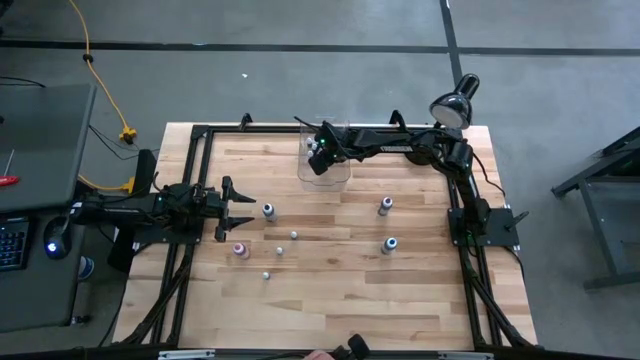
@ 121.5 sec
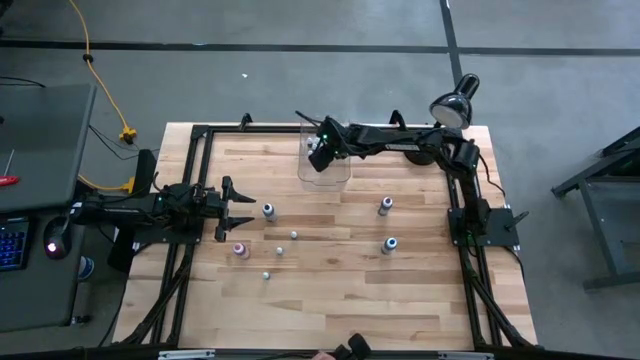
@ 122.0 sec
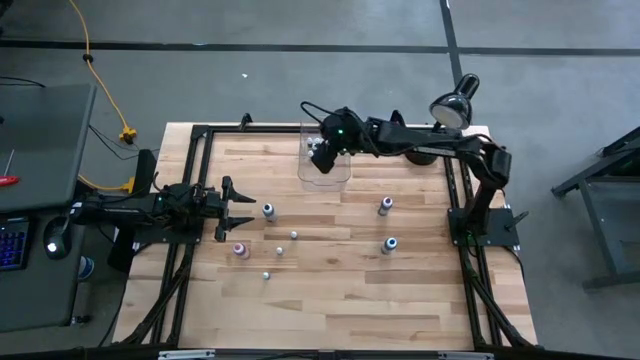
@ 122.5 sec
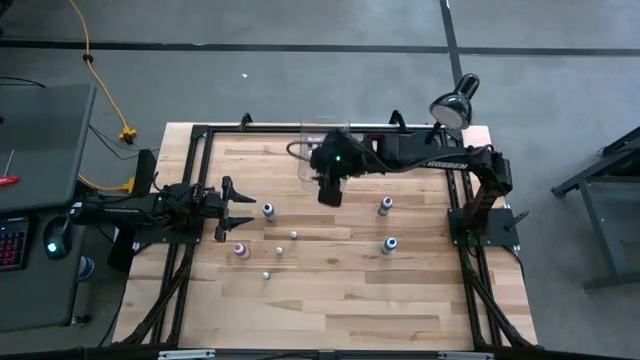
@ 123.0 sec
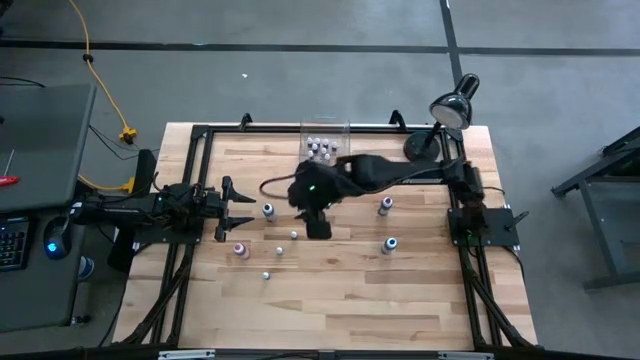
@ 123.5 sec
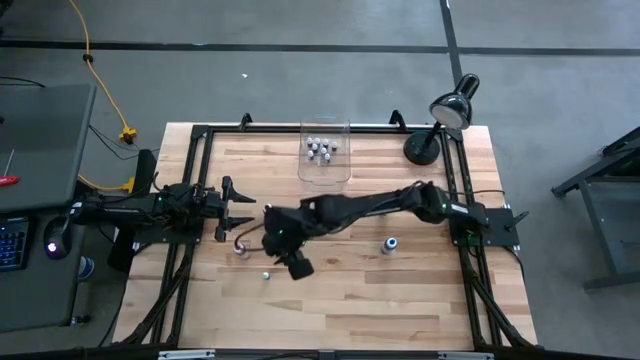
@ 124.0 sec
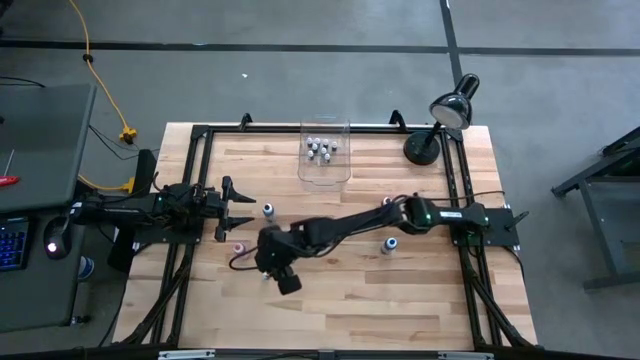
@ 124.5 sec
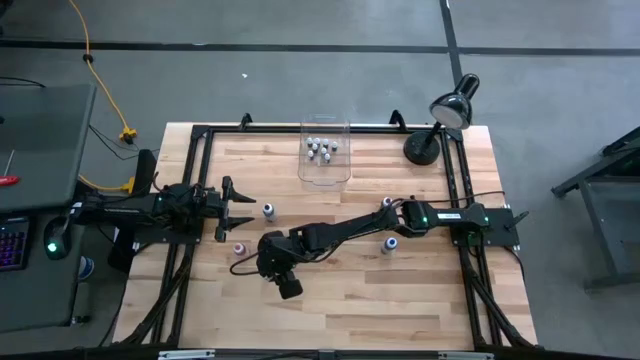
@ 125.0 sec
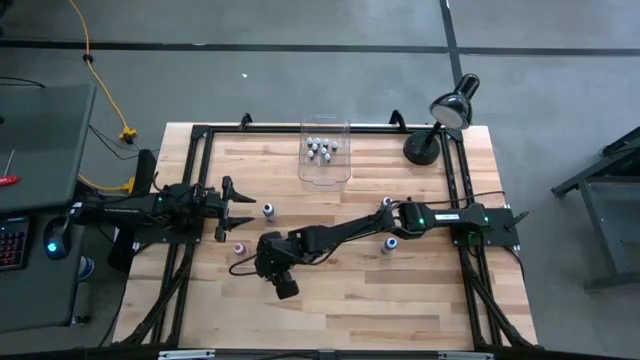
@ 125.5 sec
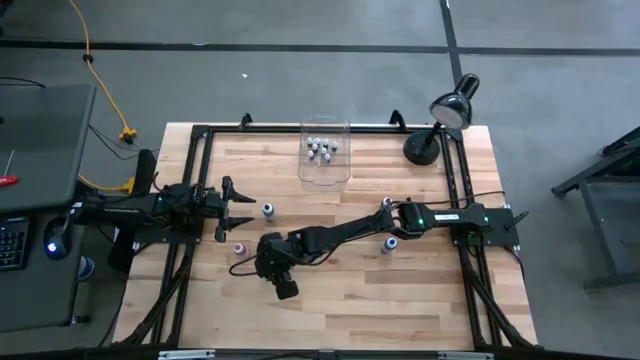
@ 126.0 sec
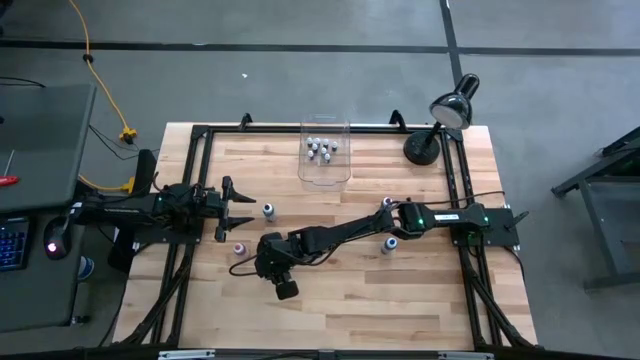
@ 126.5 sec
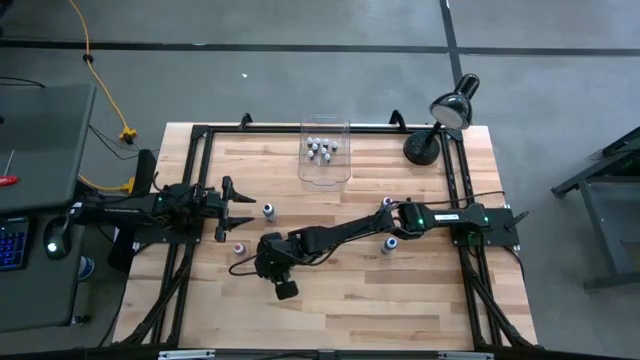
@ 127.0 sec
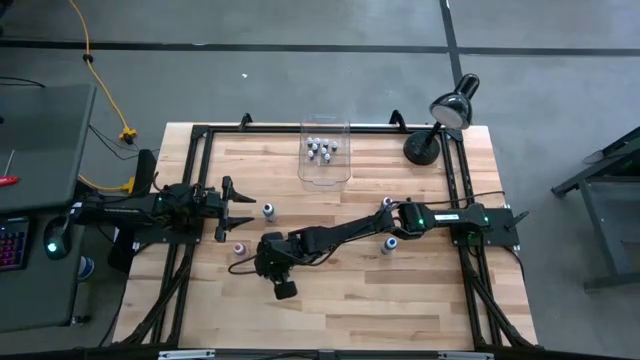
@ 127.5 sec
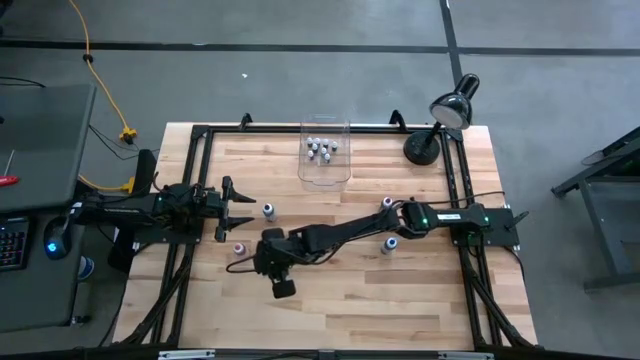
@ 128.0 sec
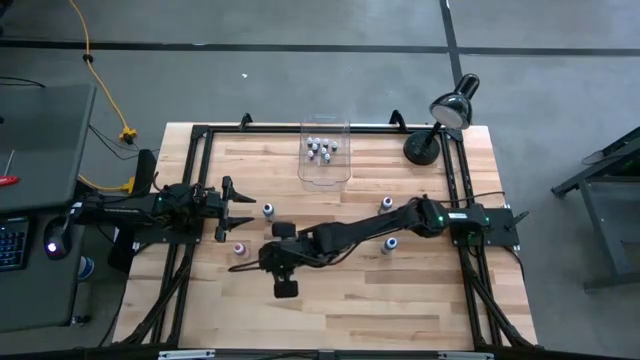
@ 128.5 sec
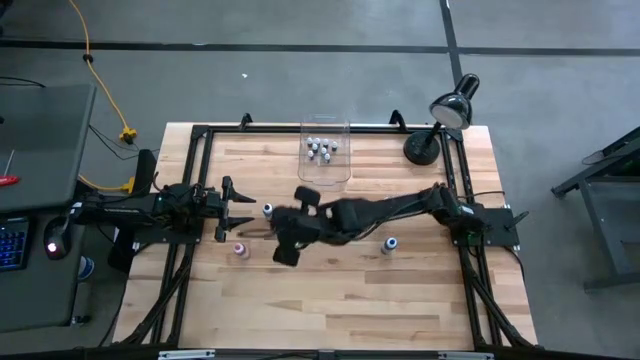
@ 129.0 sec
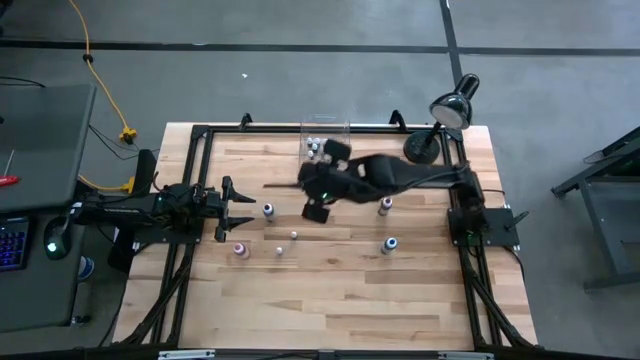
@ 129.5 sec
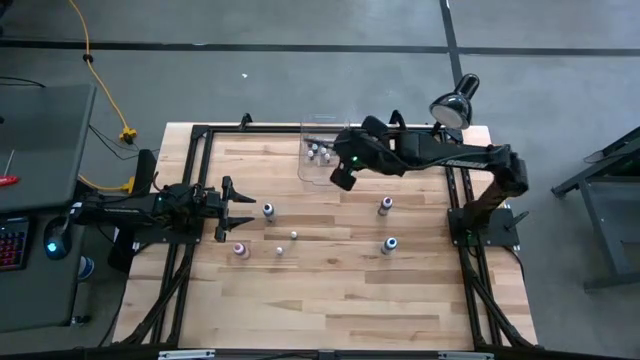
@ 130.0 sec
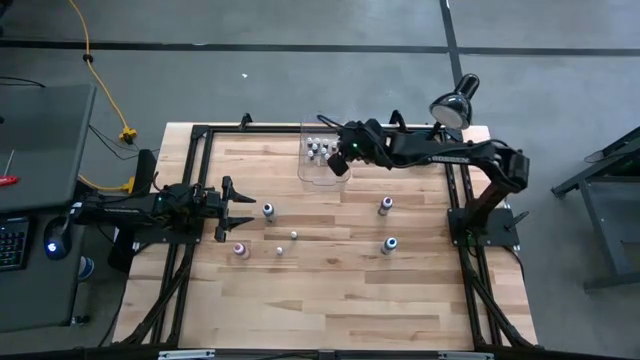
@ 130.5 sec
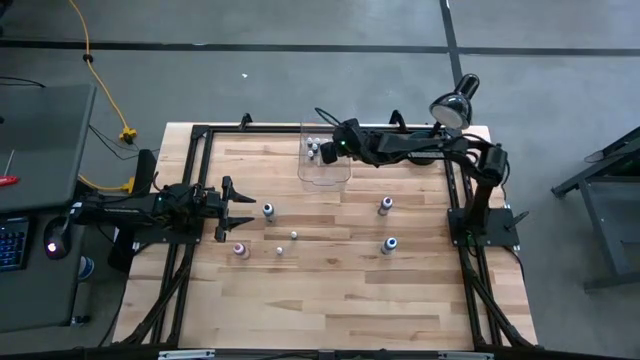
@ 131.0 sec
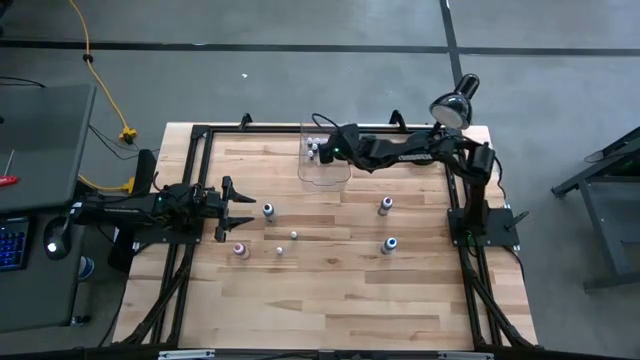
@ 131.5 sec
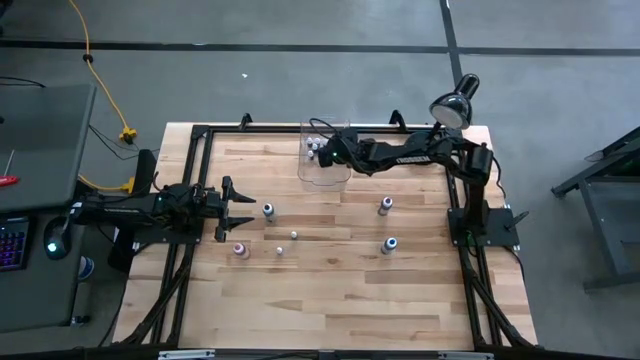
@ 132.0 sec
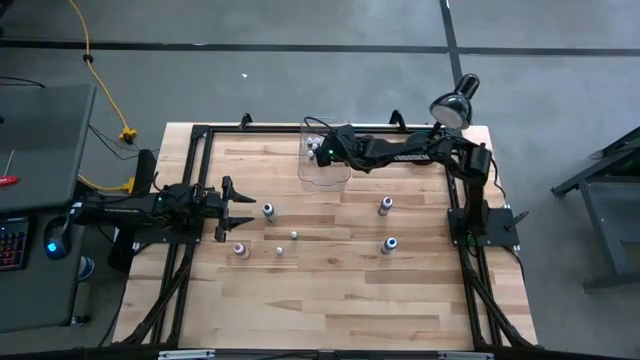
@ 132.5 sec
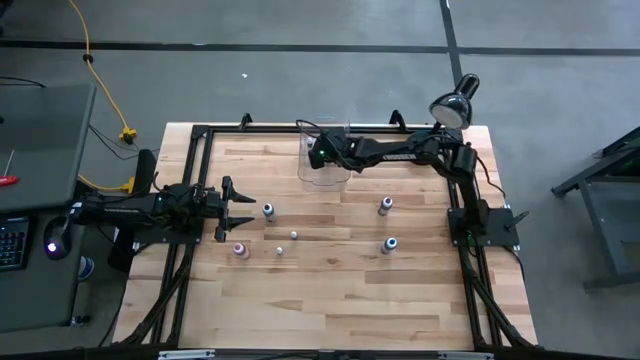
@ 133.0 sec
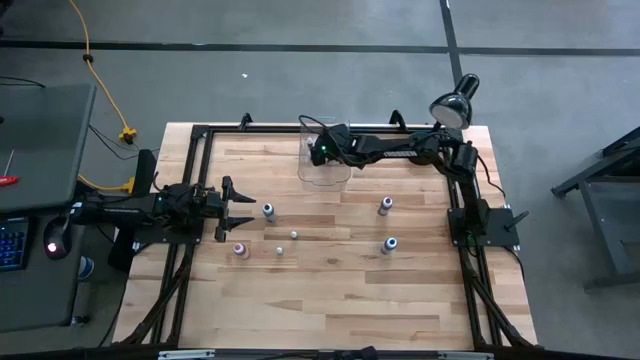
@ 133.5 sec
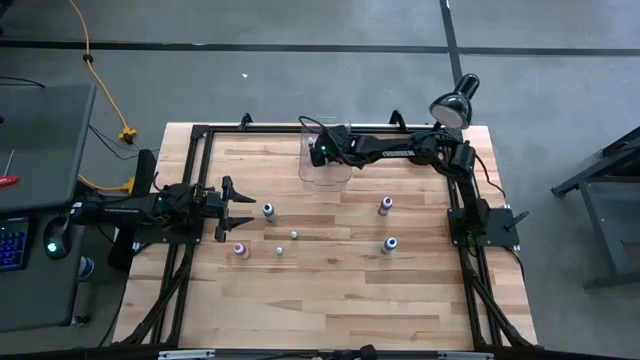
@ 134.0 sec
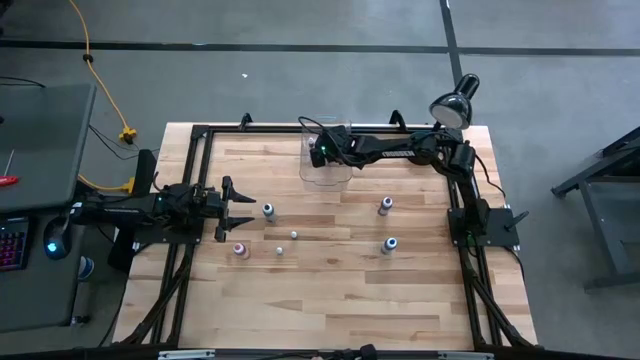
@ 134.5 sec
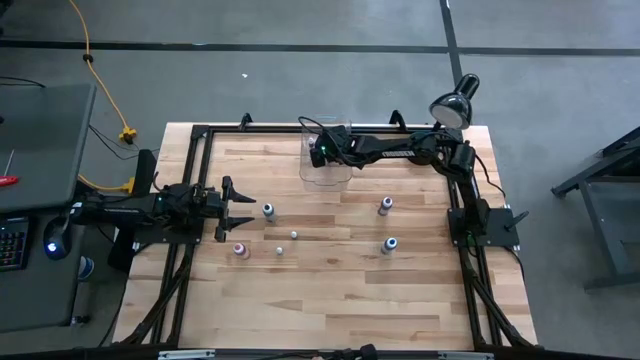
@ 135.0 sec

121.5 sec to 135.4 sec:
Task: Pick & Place food coloring
Put the small food coloring bottle into the transparent bin

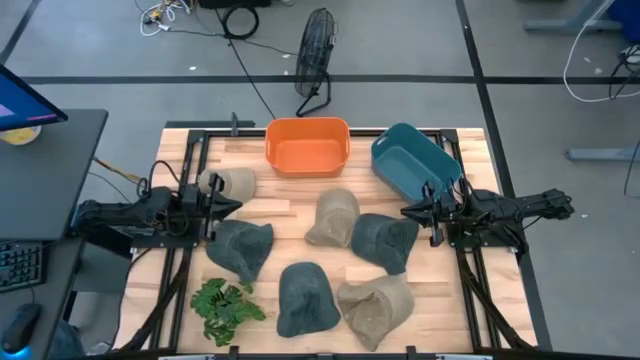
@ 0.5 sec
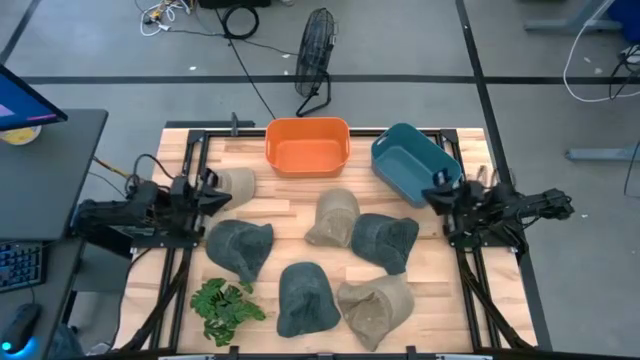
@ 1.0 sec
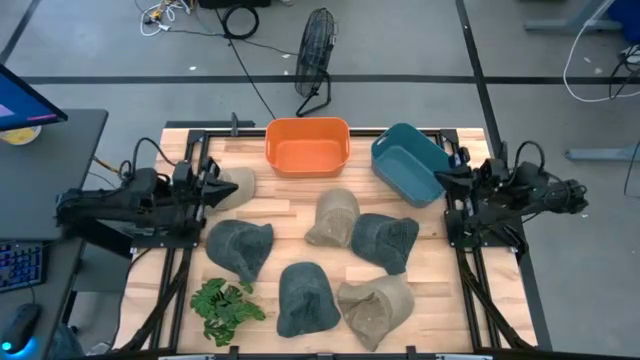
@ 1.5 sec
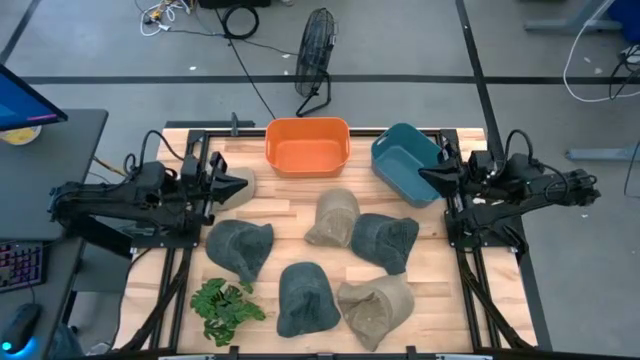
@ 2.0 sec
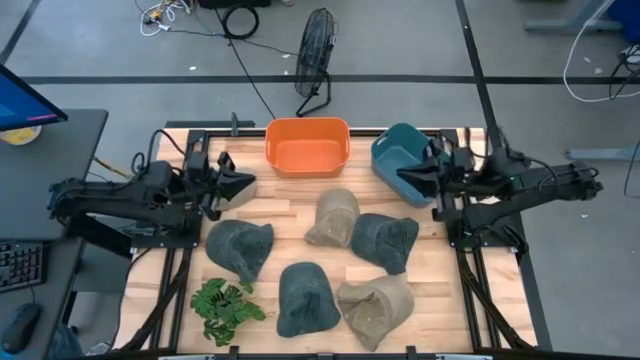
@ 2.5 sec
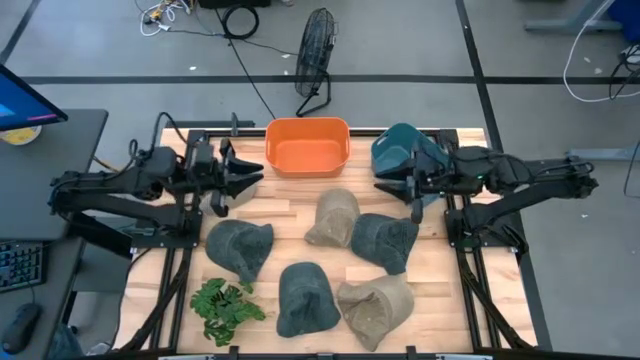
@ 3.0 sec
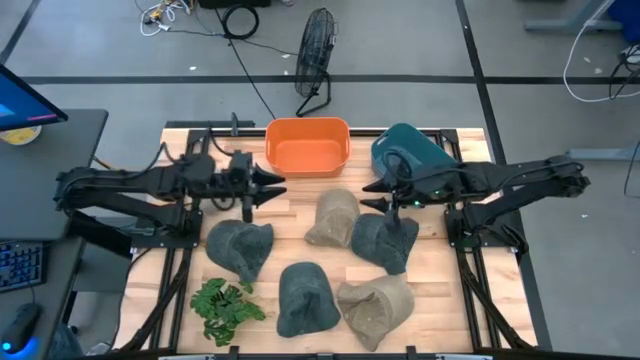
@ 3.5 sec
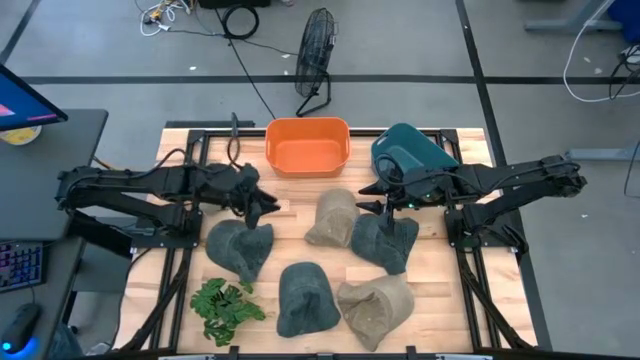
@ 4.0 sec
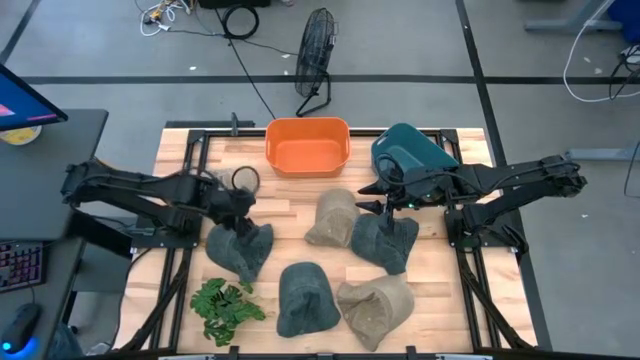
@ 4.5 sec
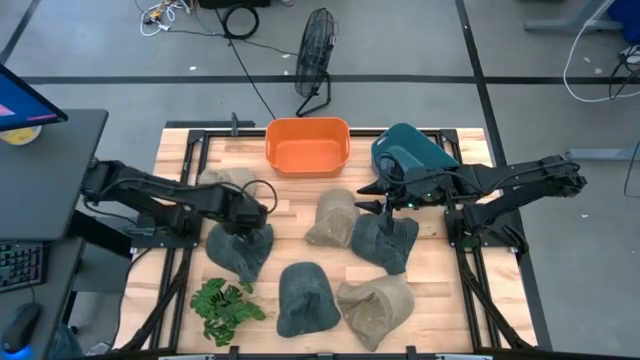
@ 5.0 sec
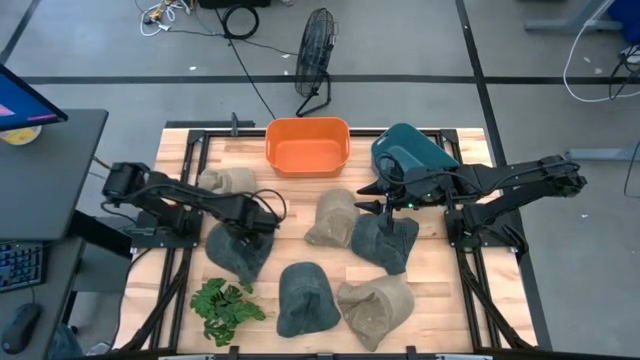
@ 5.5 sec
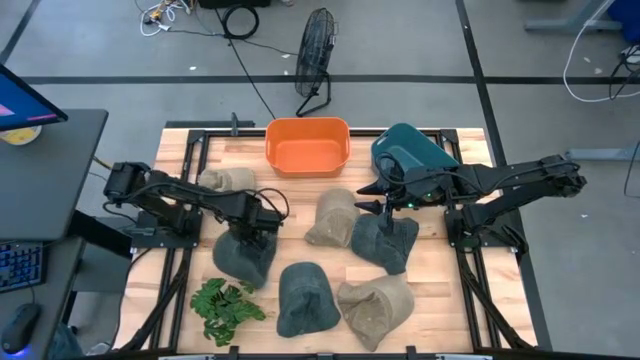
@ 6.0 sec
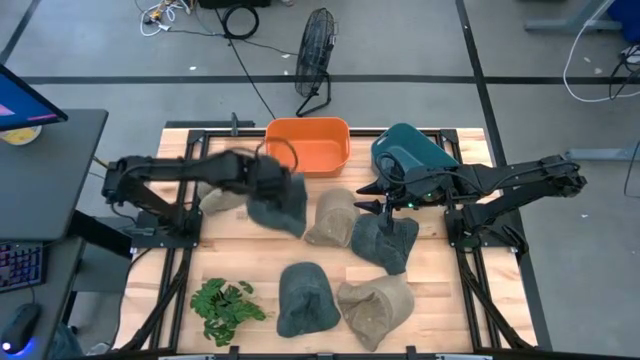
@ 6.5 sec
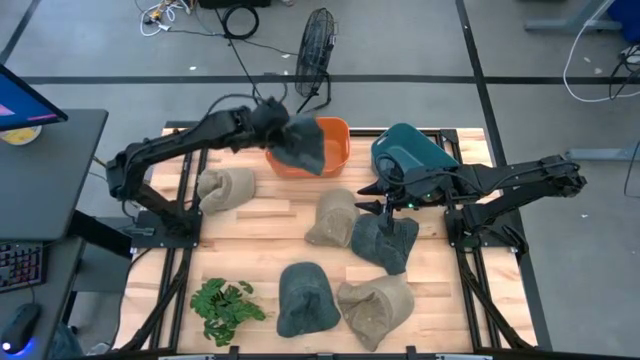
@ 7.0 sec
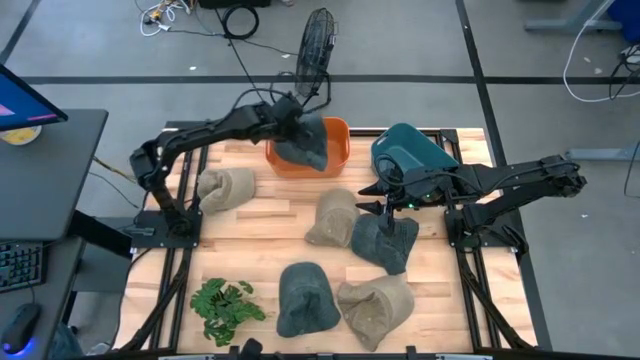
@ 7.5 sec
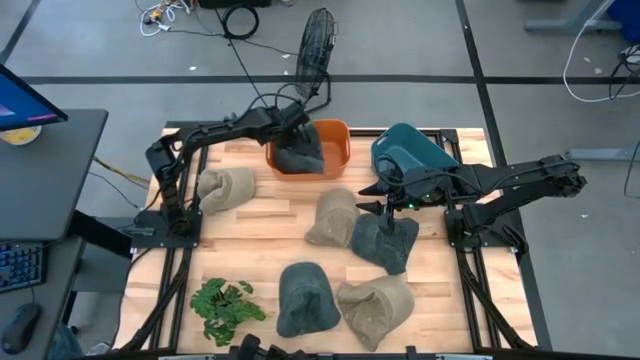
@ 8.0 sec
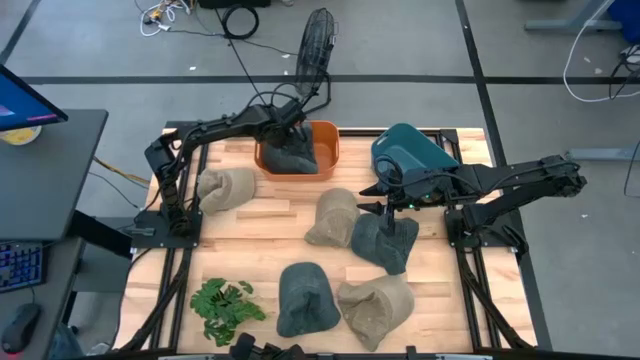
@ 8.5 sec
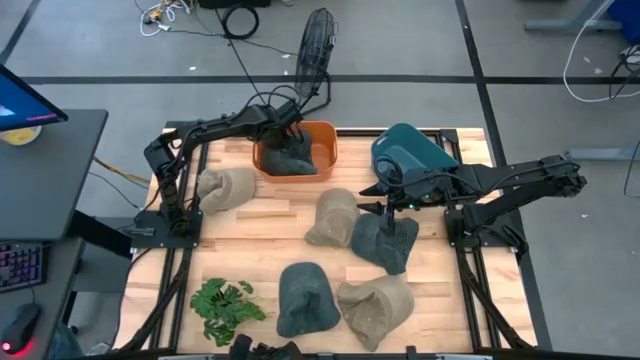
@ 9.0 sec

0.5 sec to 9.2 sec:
Task: Pick & Place hat
Put the top left blue cap into the orange bin
